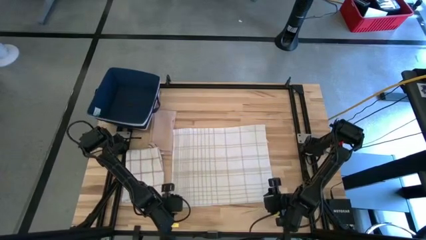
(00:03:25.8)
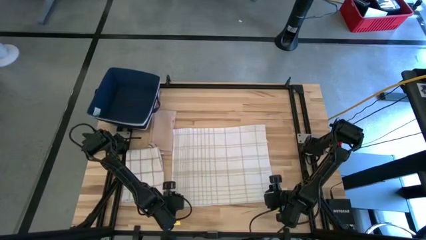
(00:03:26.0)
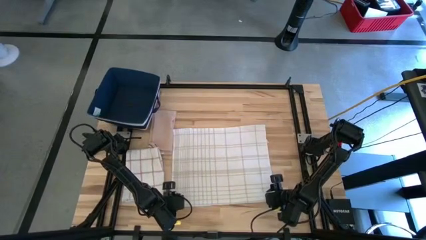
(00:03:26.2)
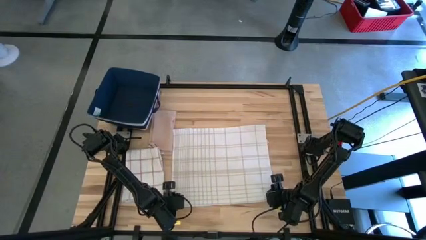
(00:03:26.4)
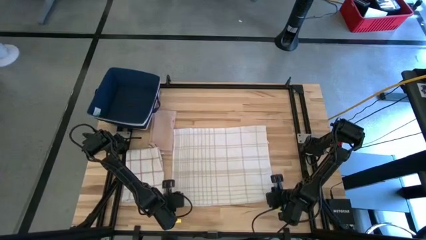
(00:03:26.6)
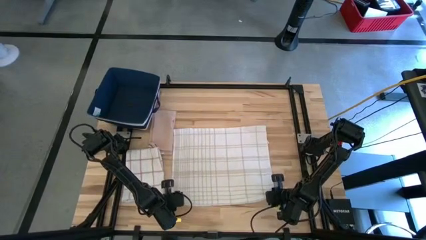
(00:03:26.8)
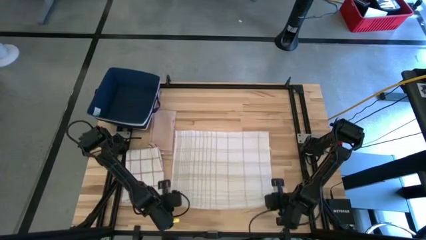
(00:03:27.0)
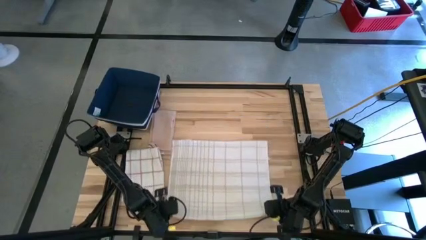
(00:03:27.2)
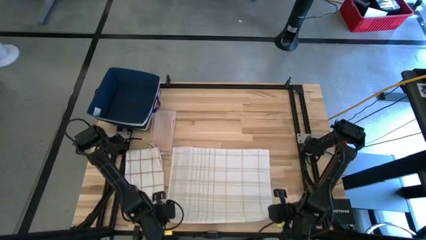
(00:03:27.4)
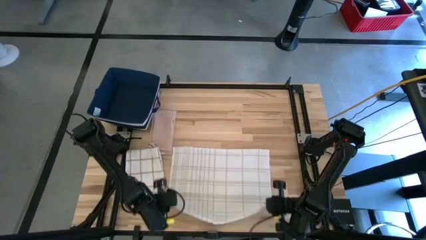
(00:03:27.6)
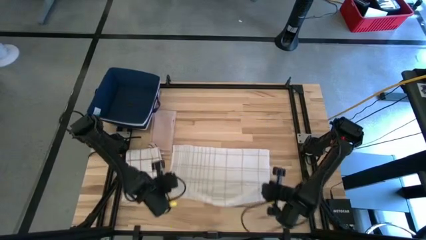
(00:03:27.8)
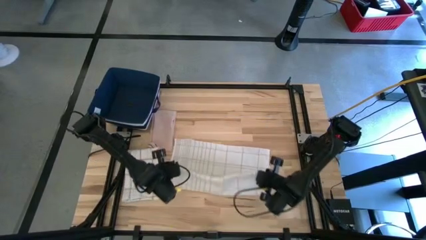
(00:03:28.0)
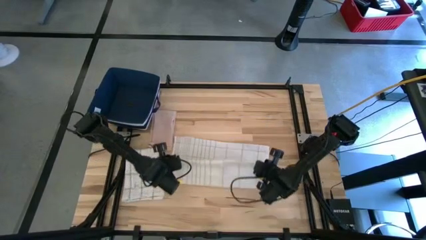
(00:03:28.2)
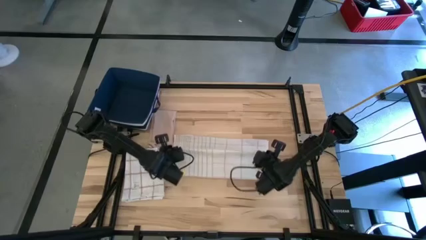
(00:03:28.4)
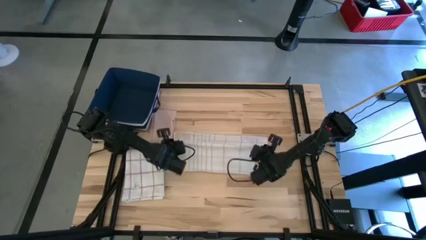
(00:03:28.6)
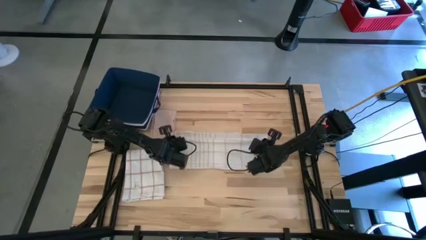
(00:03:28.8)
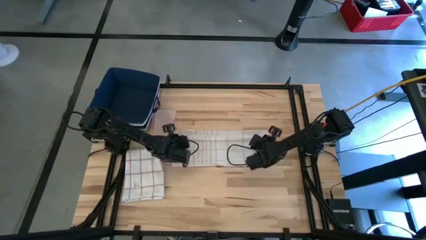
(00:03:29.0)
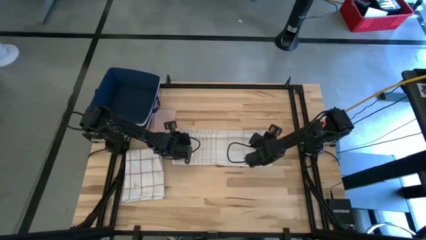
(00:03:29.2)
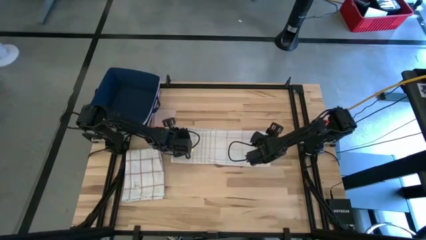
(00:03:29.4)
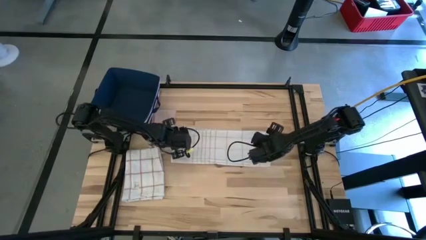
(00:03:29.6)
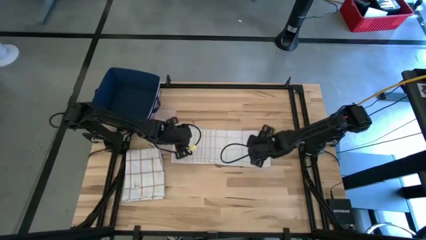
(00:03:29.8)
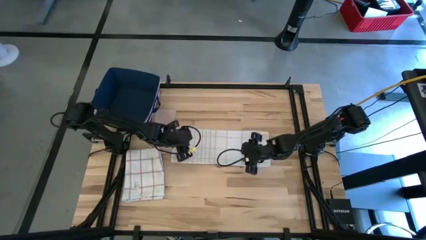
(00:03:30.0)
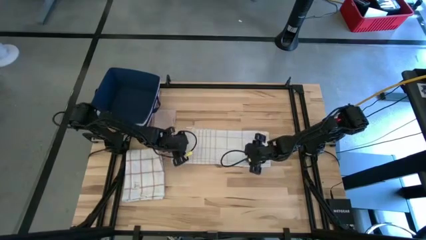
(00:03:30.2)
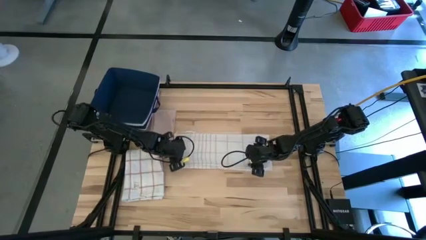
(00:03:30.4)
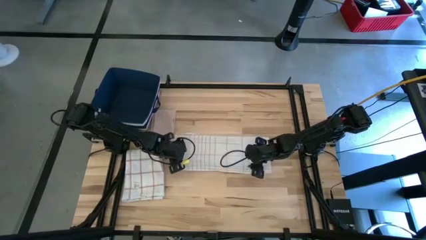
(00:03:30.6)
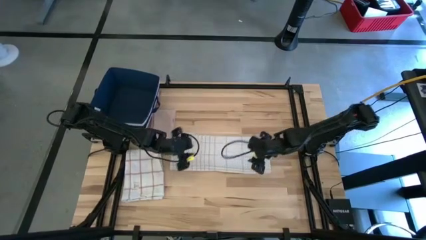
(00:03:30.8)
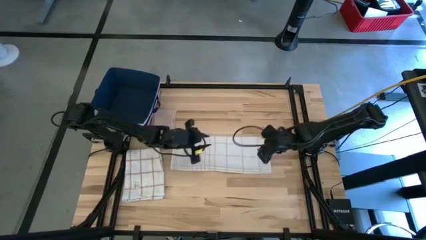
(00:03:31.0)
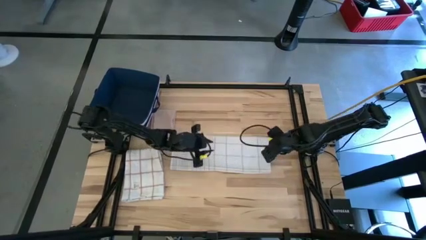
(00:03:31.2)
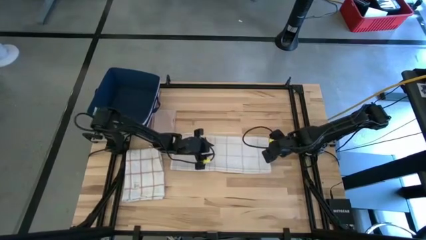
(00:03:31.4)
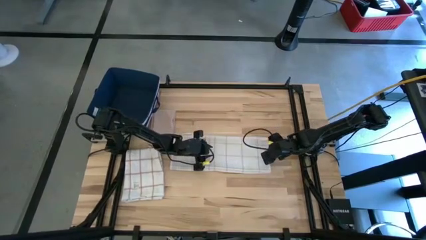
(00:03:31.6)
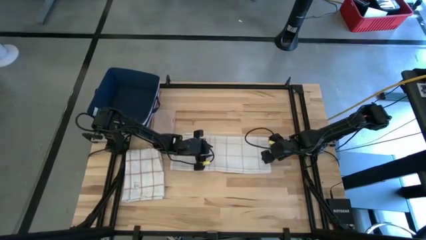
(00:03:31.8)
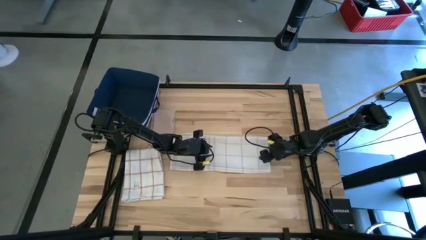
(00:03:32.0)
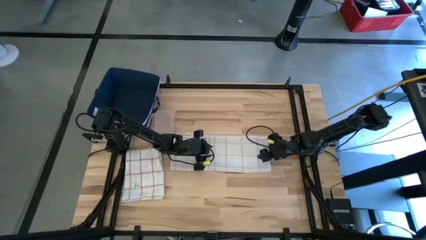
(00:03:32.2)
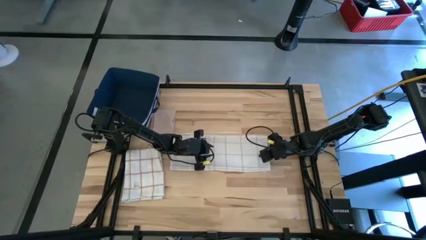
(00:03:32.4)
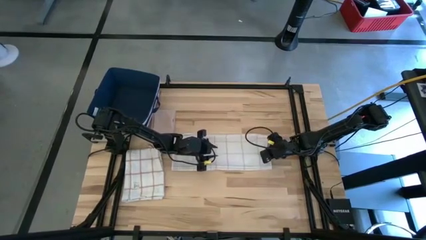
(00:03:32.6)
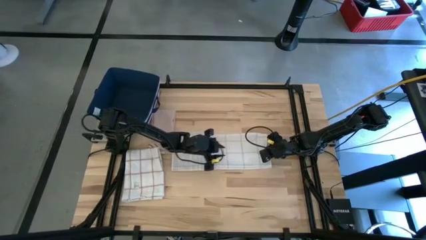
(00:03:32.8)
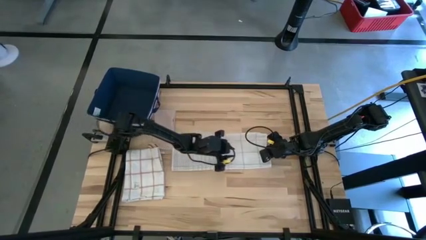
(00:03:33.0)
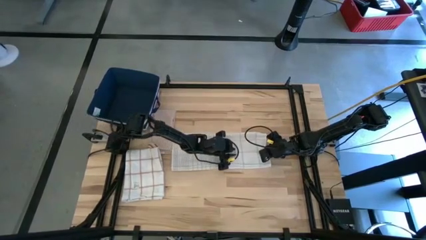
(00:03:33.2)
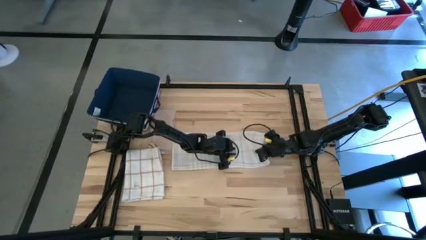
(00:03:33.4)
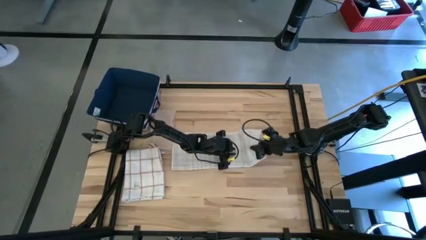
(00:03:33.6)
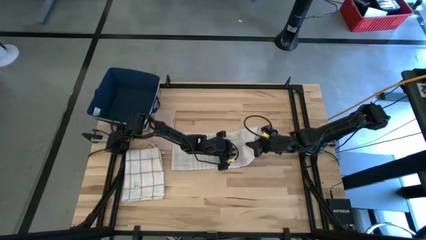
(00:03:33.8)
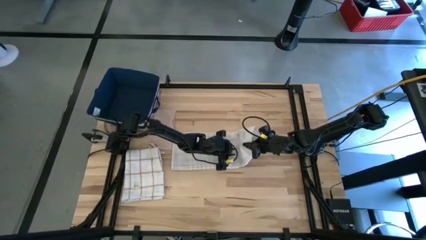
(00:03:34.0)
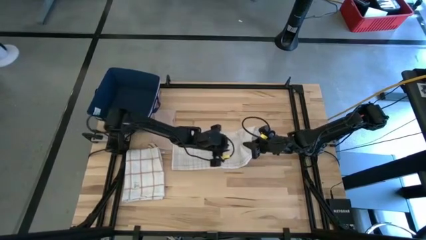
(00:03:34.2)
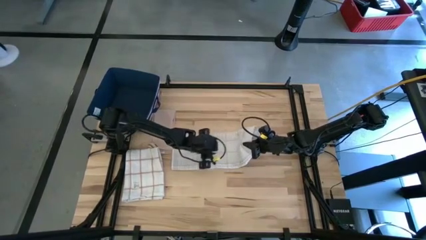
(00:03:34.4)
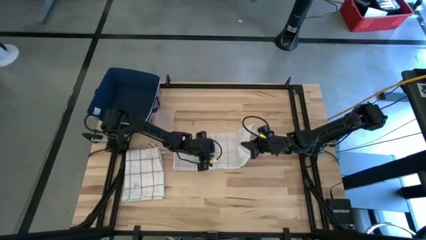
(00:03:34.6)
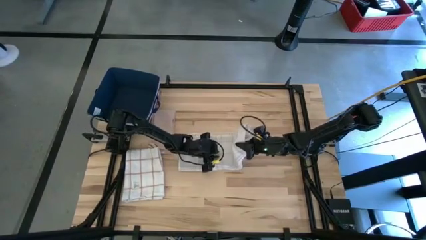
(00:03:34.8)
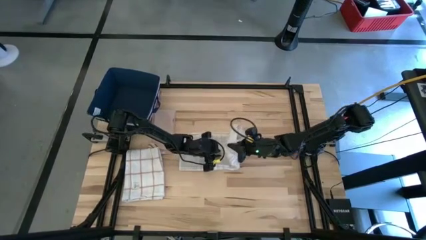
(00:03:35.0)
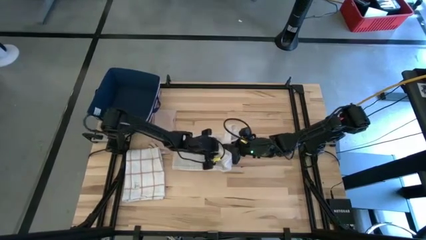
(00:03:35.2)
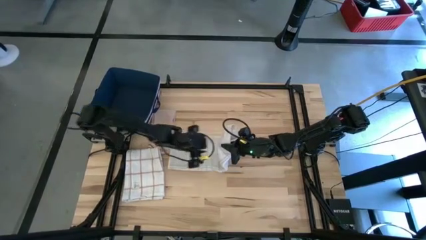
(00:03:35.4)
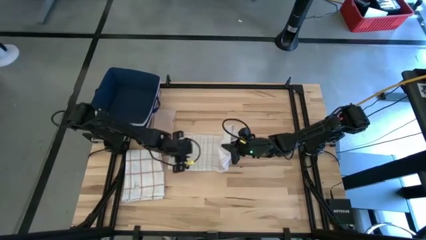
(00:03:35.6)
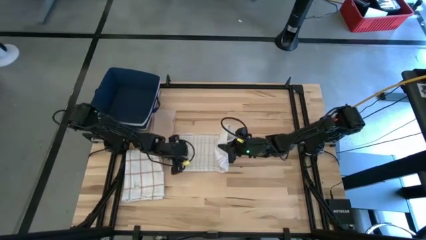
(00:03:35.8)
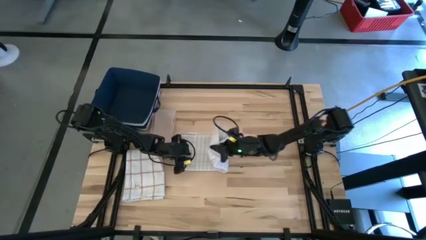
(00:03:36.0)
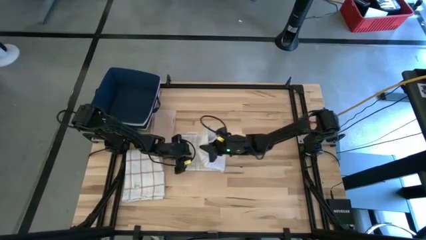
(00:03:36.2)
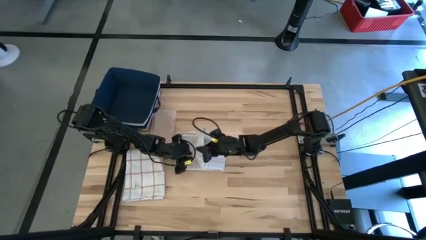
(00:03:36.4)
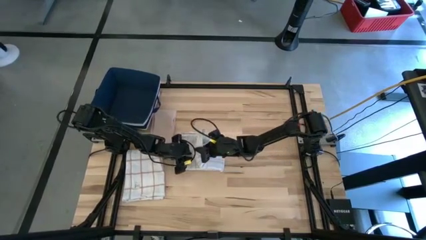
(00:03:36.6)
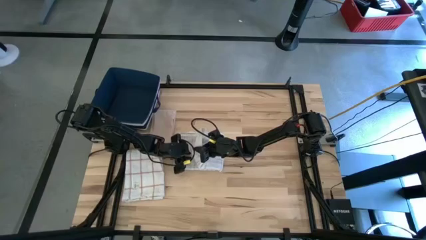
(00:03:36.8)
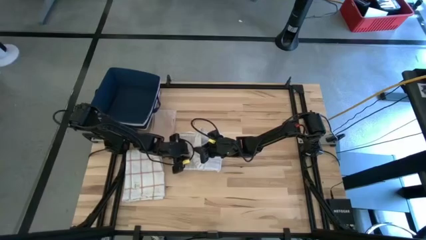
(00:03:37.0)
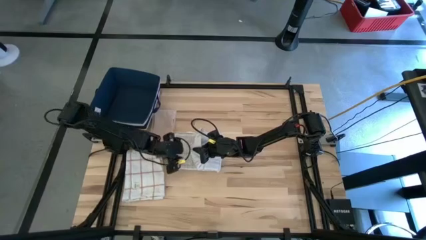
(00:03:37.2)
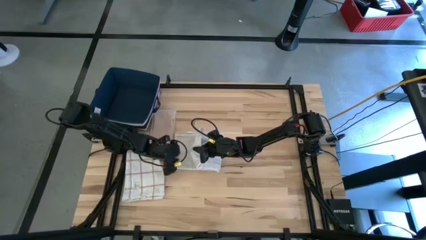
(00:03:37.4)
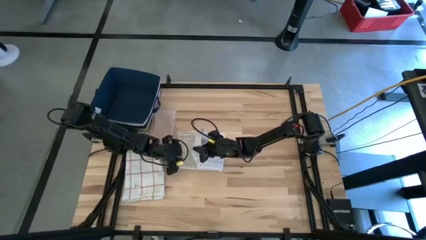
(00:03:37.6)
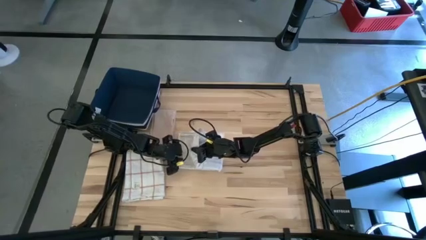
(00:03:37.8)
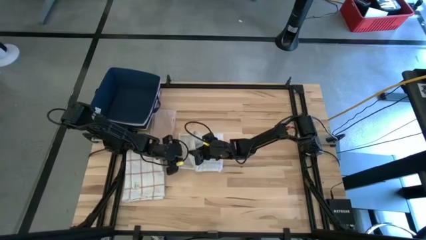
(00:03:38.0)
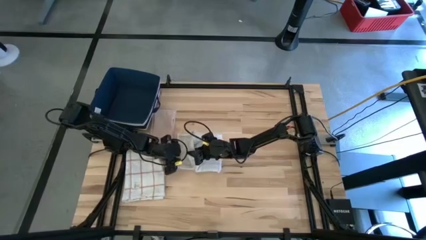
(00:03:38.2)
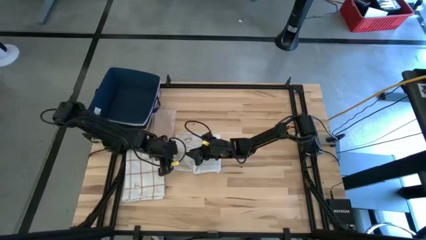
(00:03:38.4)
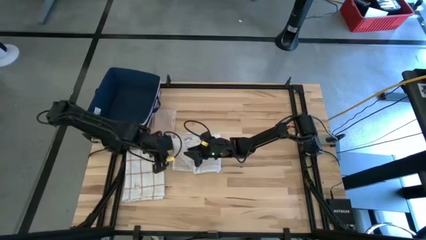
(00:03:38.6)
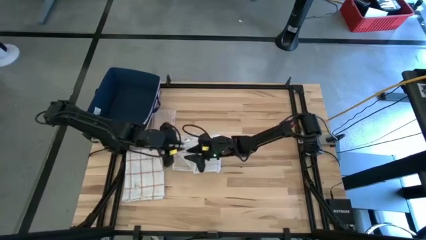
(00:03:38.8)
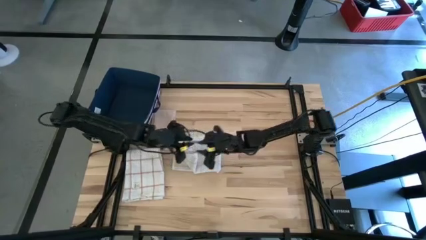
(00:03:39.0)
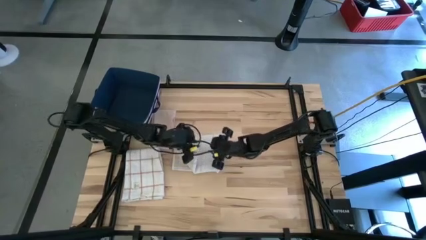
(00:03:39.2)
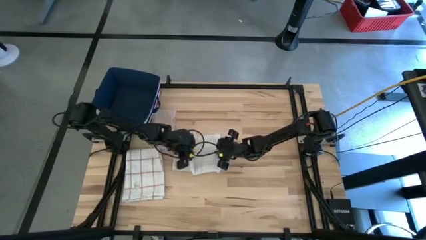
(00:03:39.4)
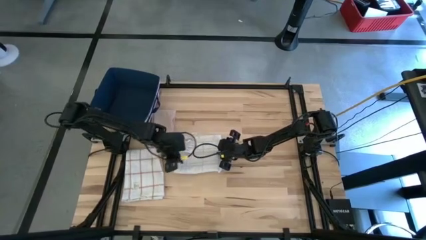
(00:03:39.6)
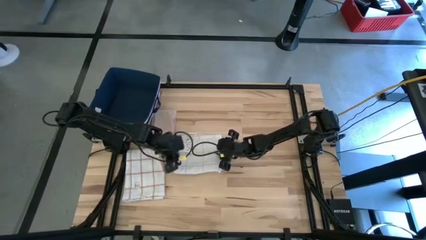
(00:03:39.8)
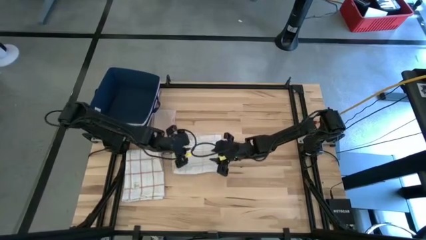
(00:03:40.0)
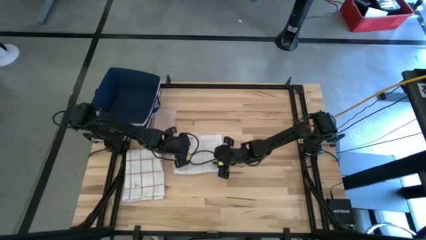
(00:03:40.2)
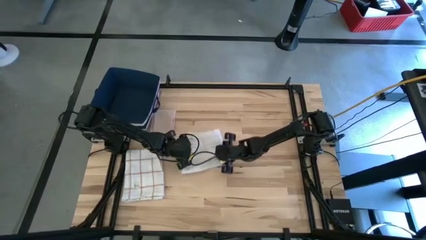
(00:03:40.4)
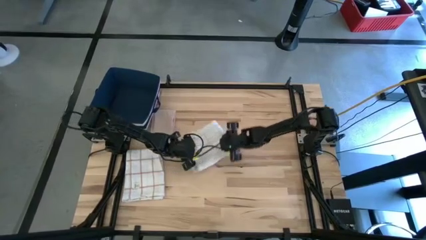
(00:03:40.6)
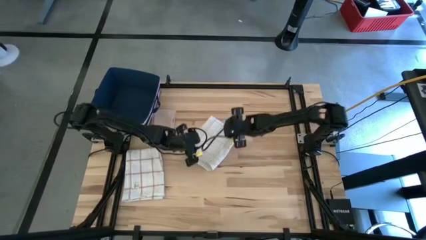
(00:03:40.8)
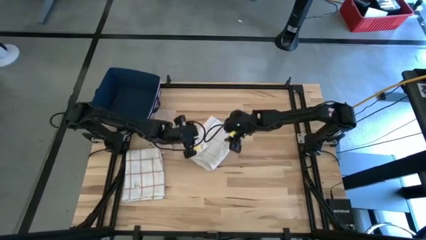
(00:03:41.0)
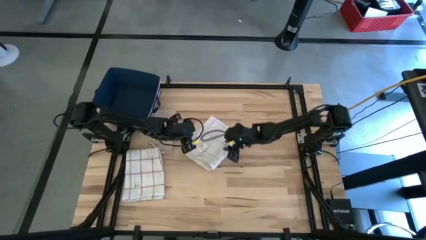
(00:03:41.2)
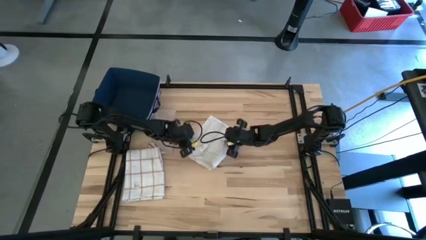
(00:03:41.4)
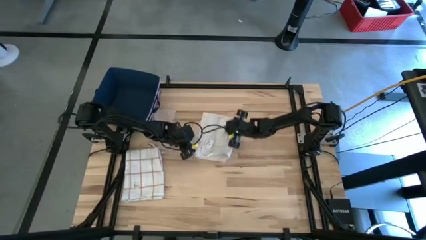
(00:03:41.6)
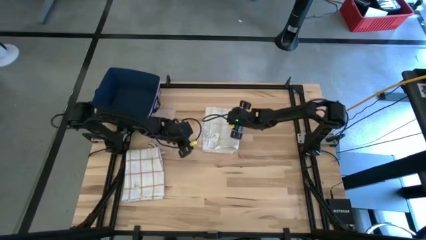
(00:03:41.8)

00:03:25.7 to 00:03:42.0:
Task: Fold towel
Fold the right checkered white towel
